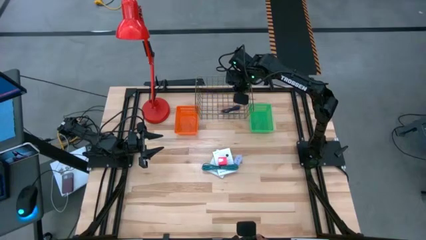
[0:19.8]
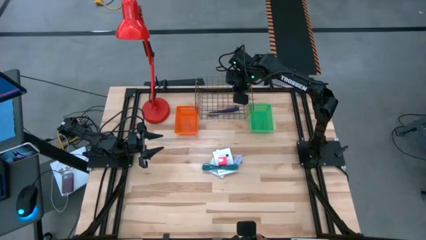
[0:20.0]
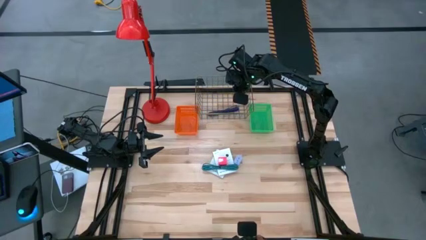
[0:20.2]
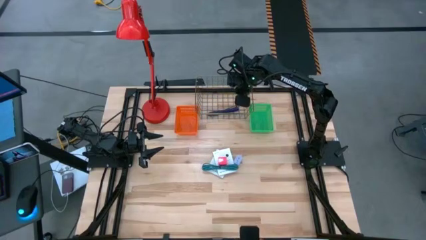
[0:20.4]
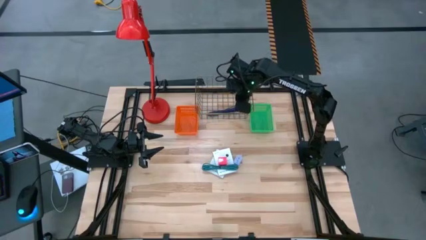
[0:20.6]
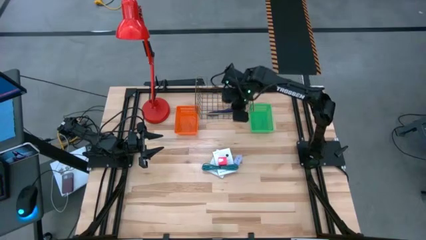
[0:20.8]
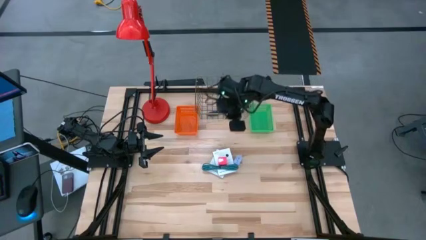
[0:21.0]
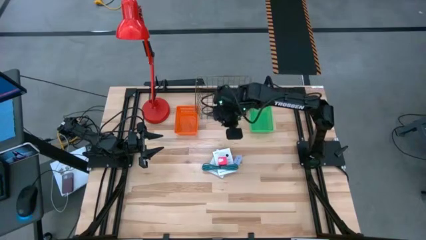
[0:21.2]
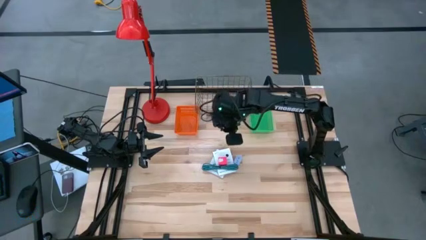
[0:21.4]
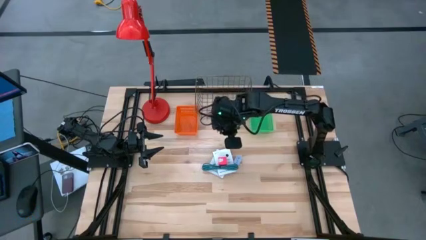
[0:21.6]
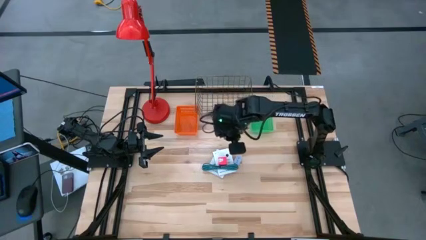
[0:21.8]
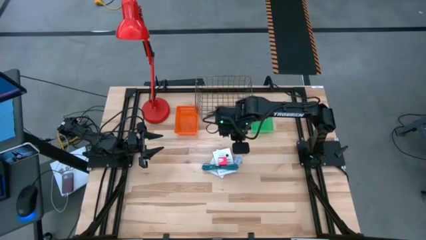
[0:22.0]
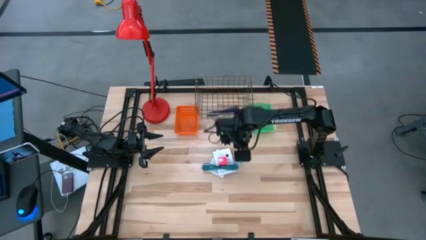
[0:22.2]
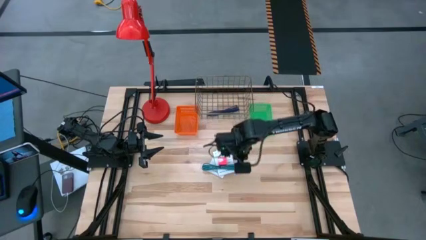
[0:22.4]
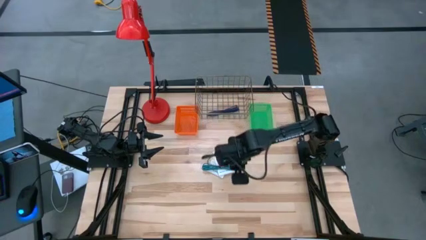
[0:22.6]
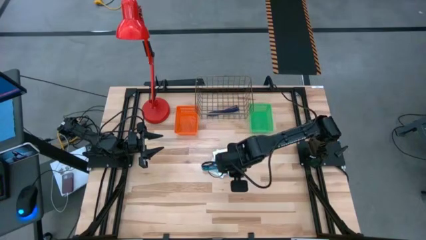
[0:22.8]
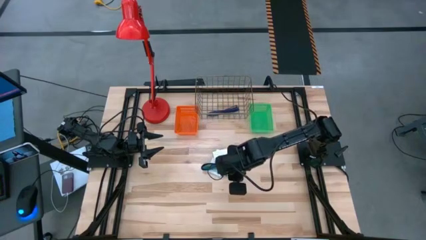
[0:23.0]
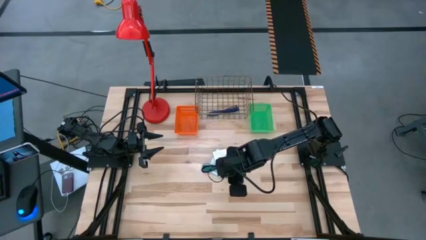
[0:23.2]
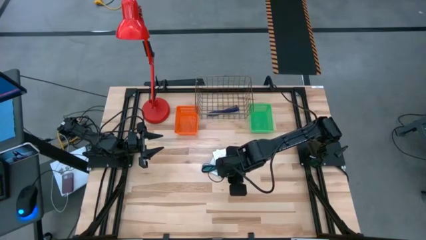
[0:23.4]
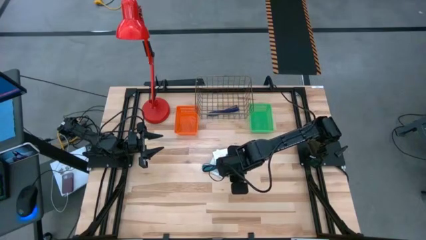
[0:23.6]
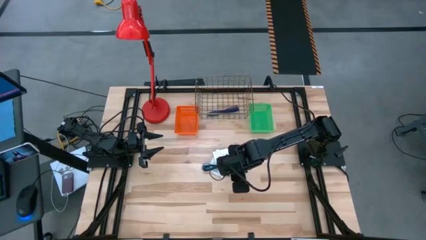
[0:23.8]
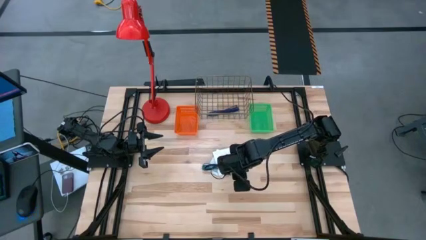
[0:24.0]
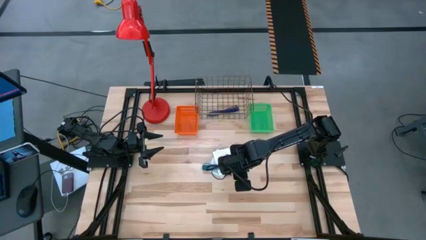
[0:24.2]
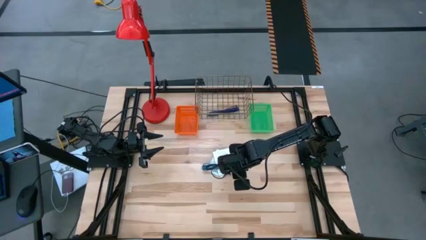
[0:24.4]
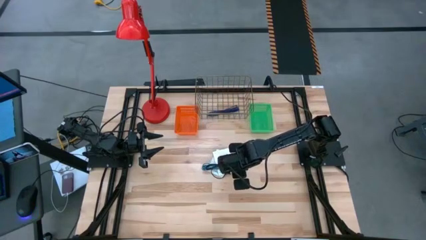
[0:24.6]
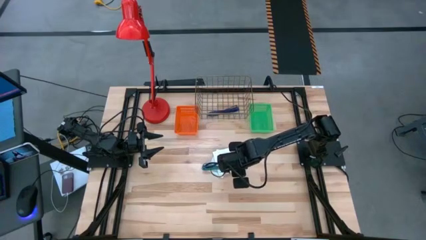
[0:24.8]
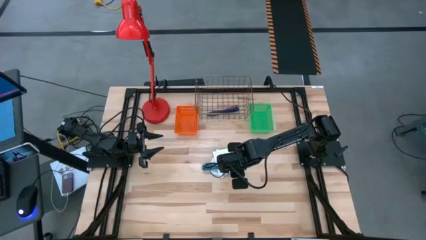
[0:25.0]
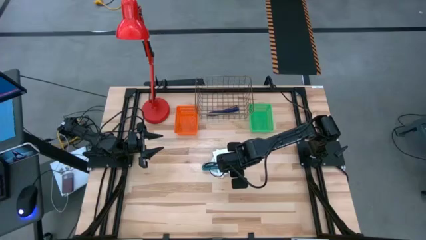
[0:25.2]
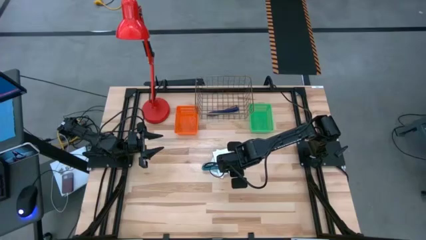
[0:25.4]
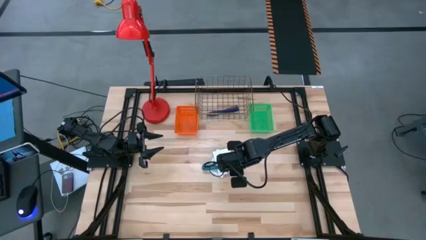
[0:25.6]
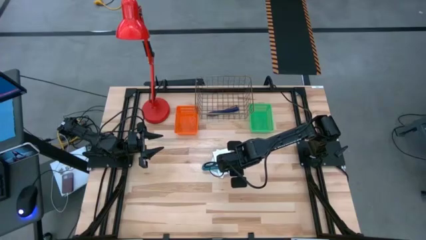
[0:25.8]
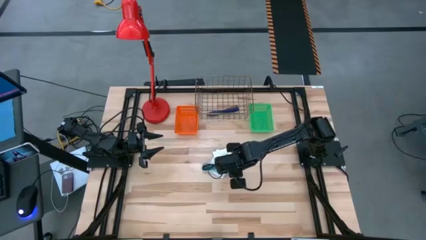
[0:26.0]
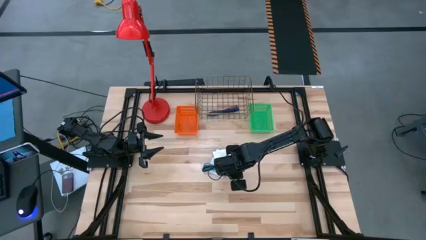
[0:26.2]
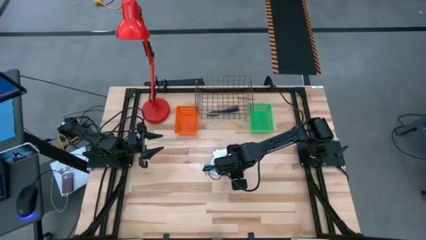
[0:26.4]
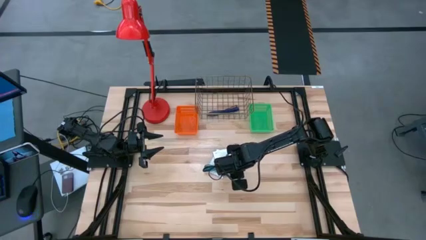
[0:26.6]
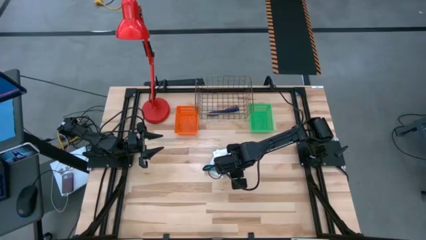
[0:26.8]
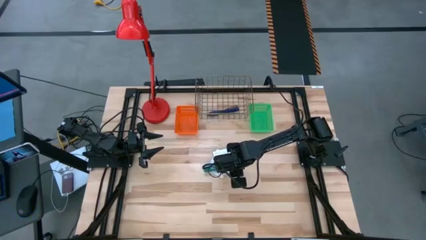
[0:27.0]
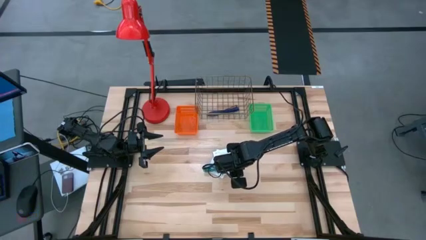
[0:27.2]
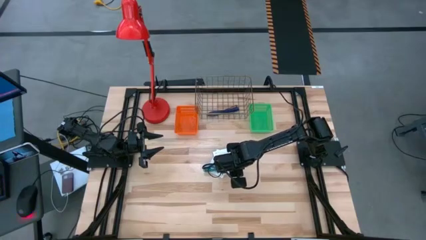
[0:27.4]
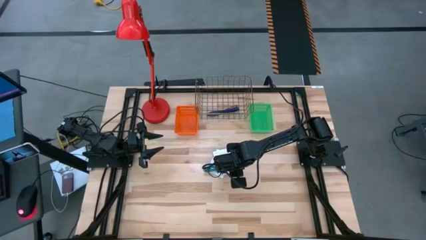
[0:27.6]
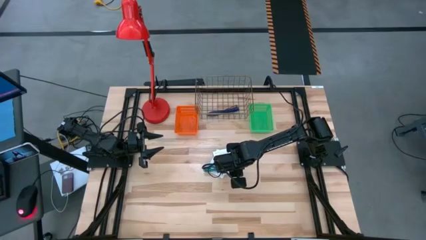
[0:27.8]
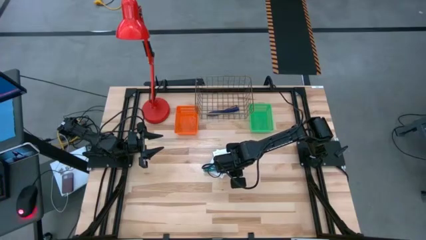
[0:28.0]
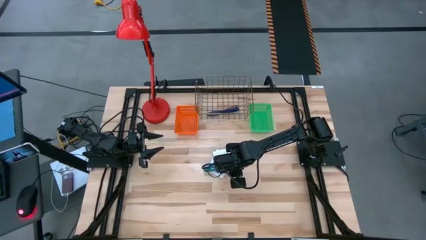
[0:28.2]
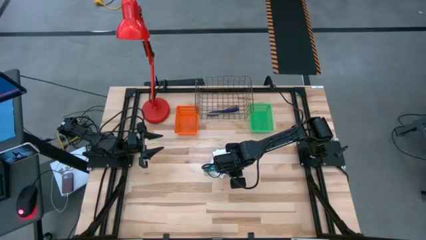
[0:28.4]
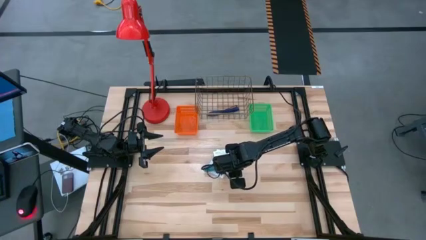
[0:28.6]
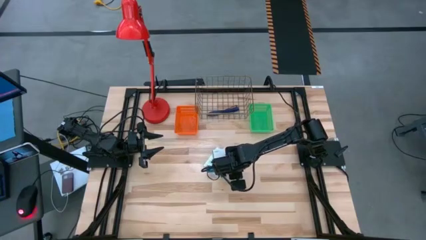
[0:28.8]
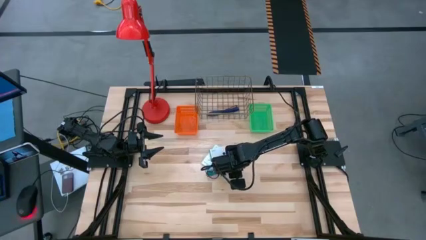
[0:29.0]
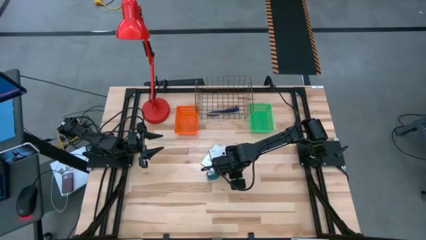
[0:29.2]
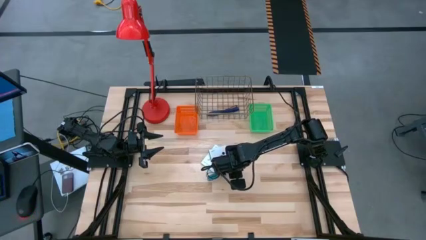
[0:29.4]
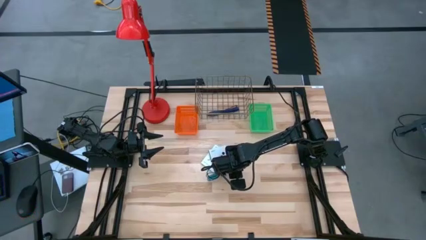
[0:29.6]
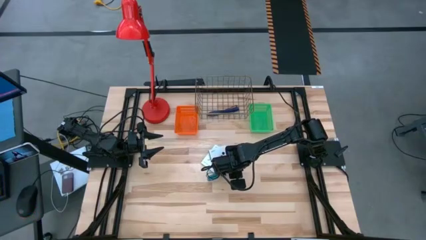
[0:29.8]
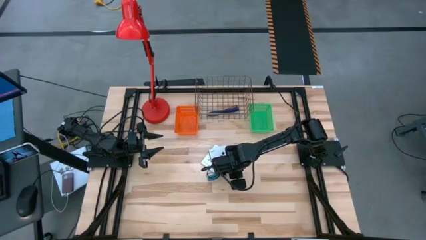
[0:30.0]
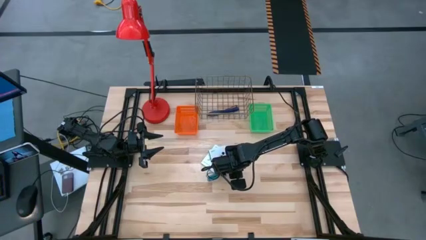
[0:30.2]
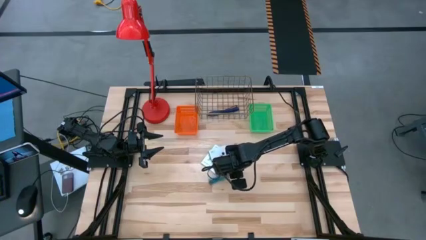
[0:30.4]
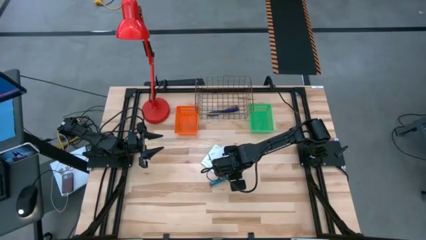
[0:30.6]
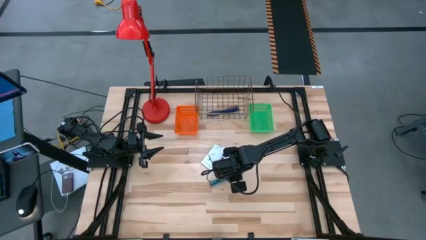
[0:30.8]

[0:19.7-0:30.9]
Task: Pick and place items into bin
Put the blue charger cable into the wire basket

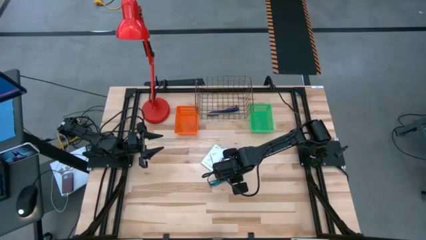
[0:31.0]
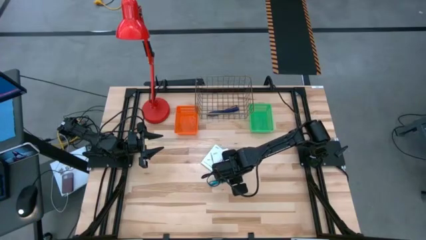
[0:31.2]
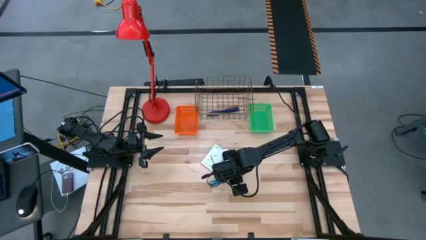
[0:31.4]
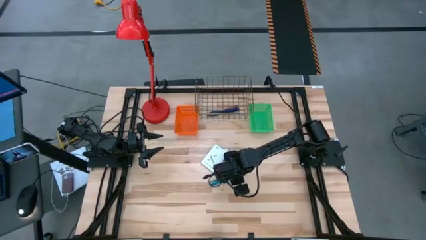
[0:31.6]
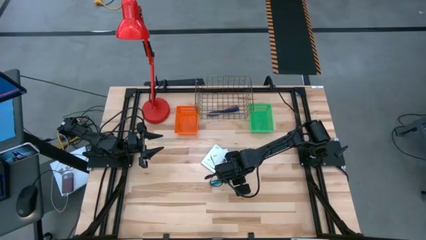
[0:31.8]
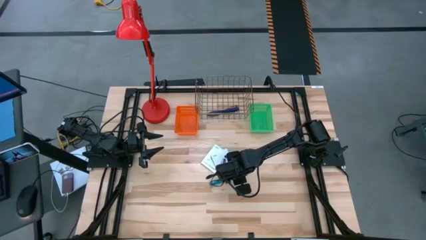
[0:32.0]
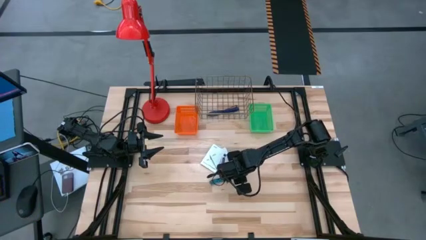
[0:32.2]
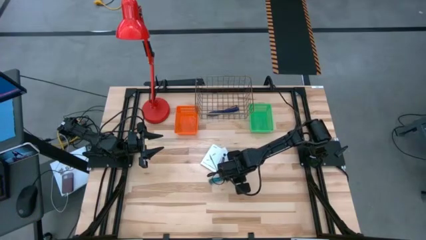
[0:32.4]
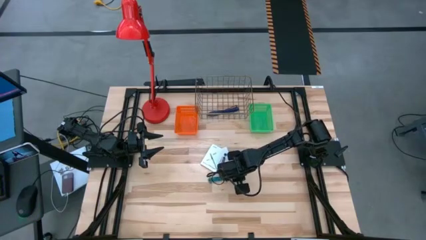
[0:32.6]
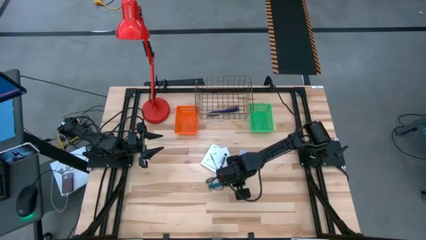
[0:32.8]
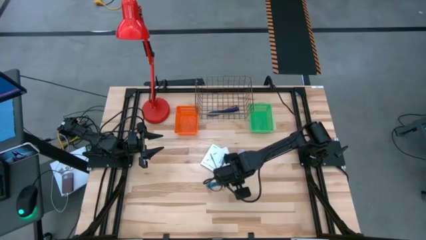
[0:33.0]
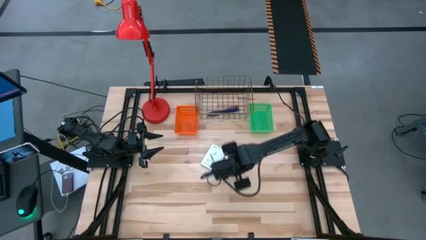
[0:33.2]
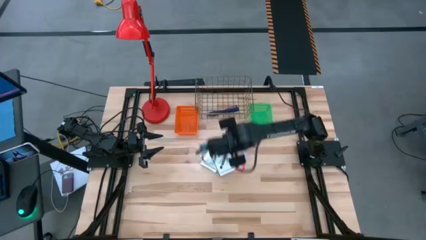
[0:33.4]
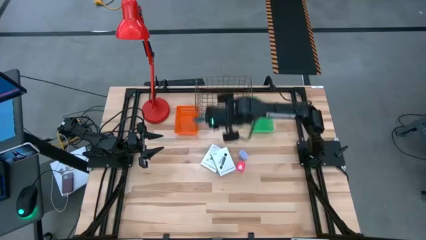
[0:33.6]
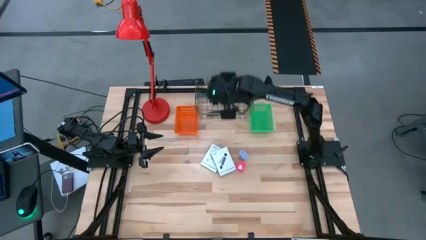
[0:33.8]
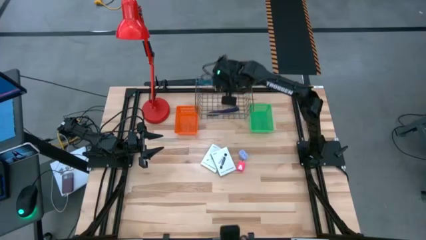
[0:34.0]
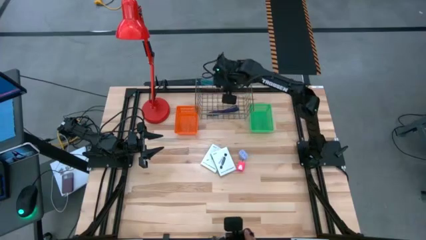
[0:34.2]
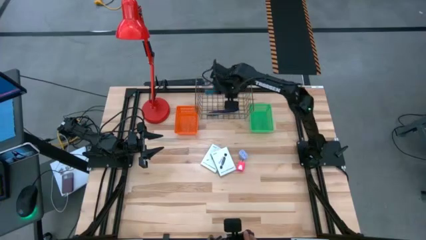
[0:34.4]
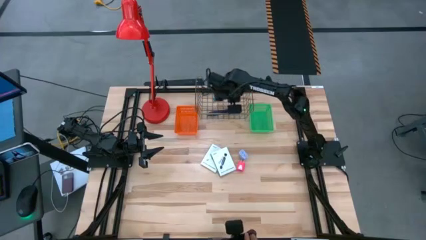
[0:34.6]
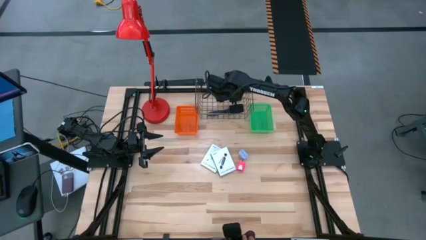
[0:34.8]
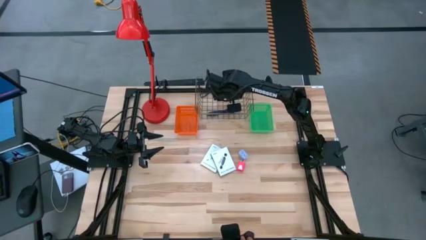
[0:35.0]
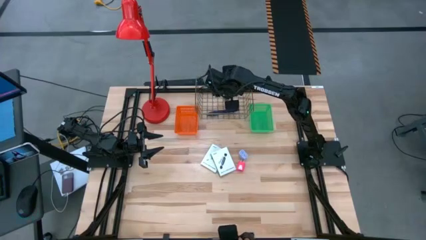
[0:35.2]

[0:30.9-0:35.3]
Put the blue charger cable into the wire basket
